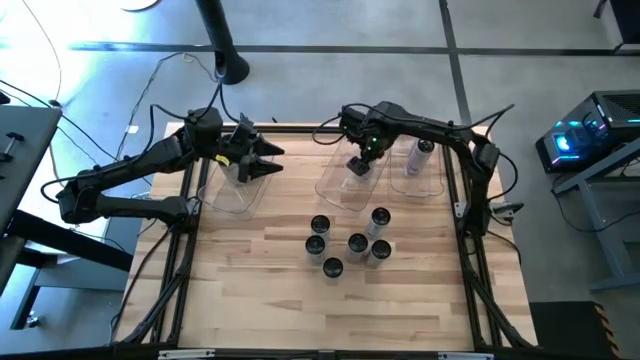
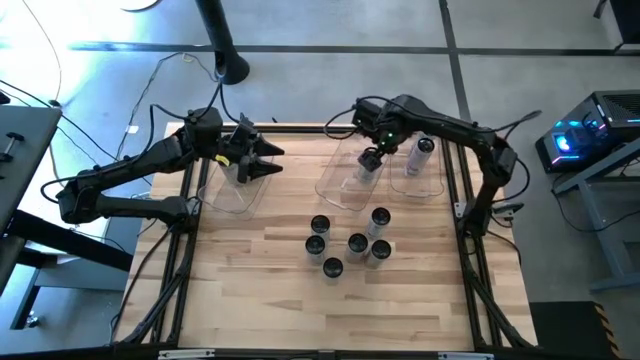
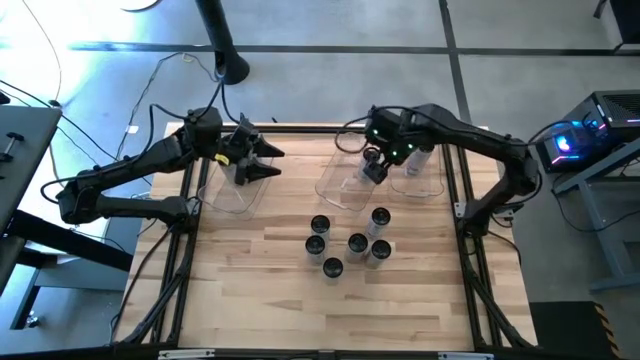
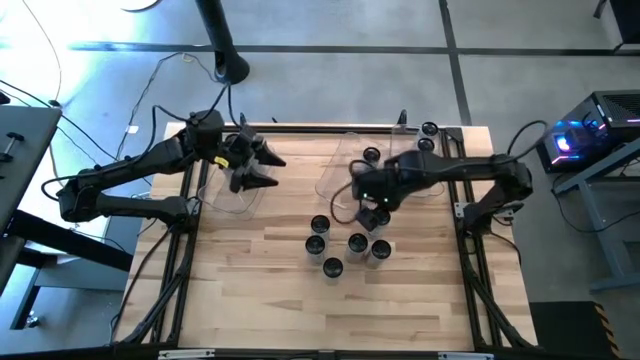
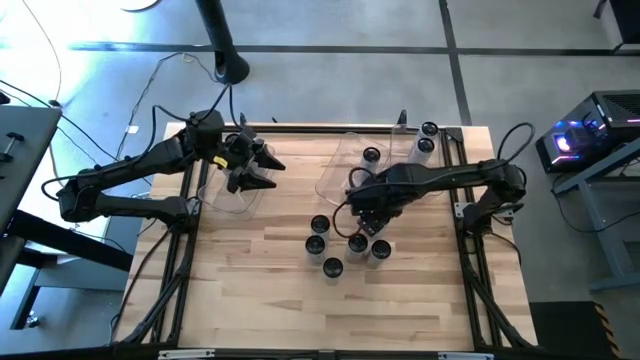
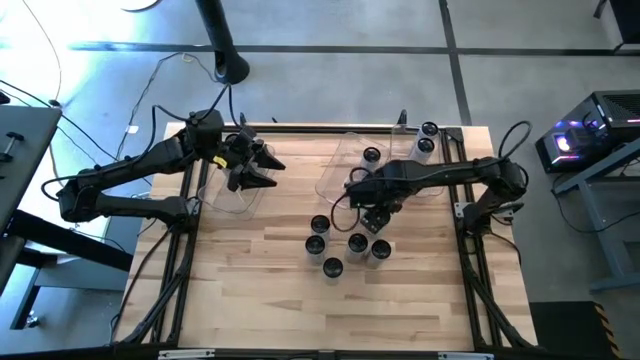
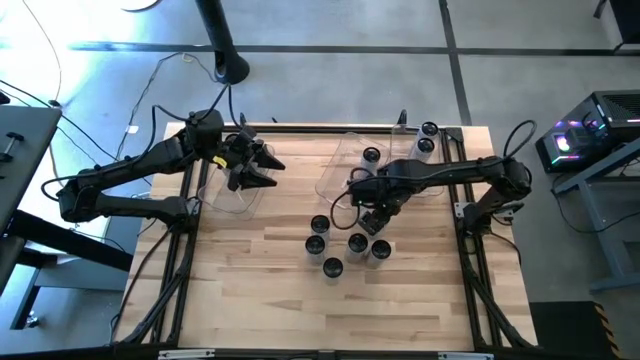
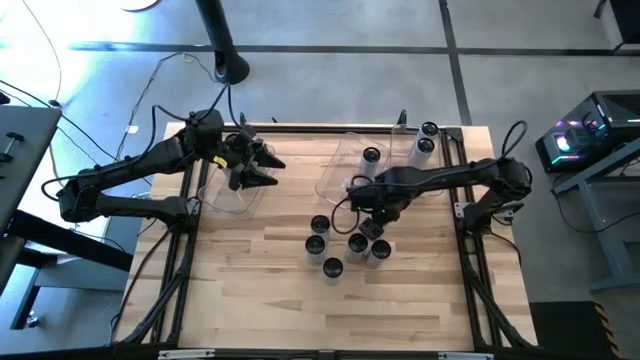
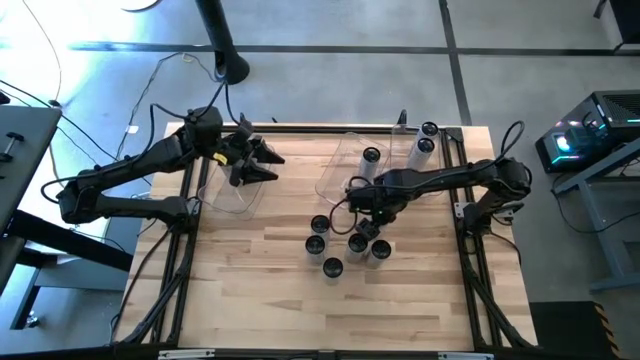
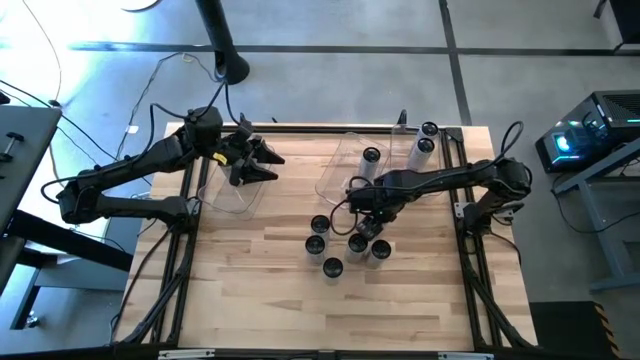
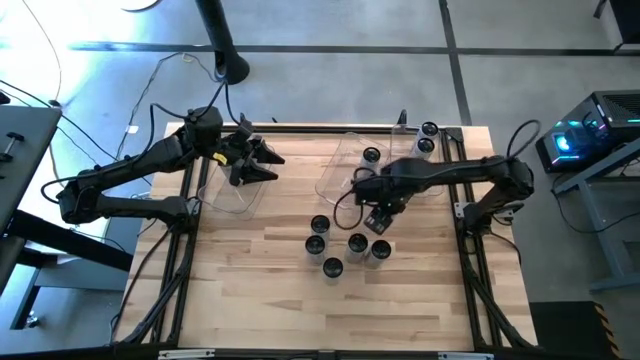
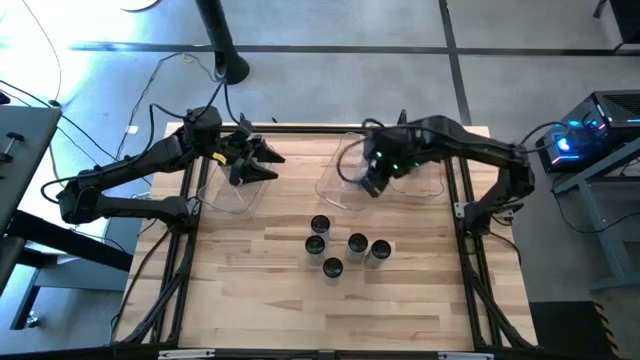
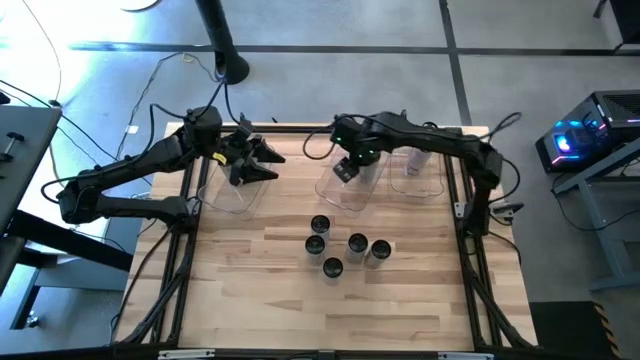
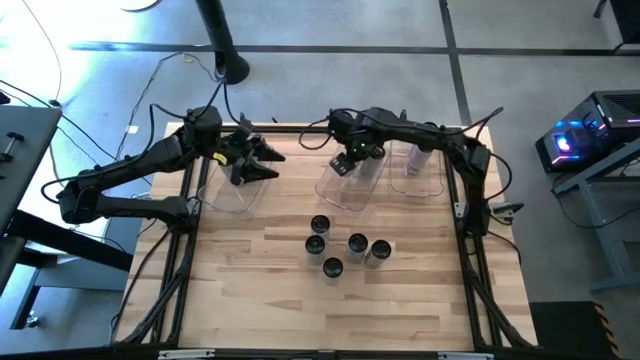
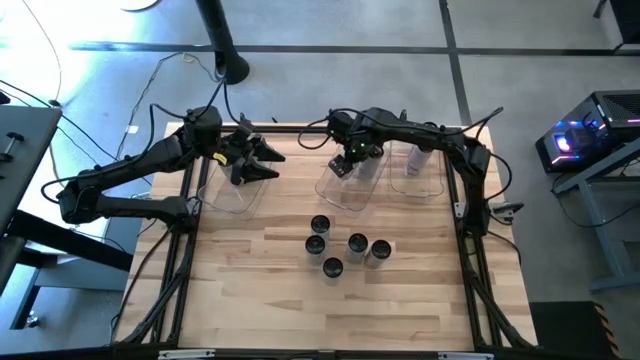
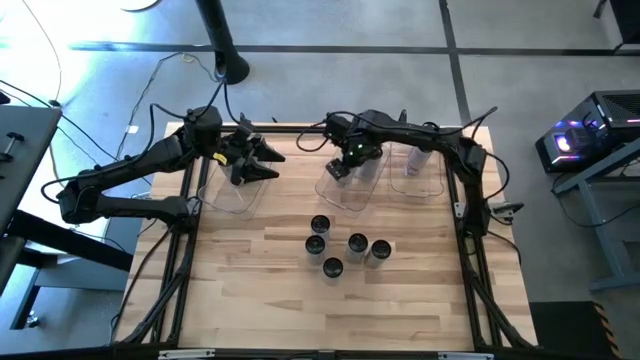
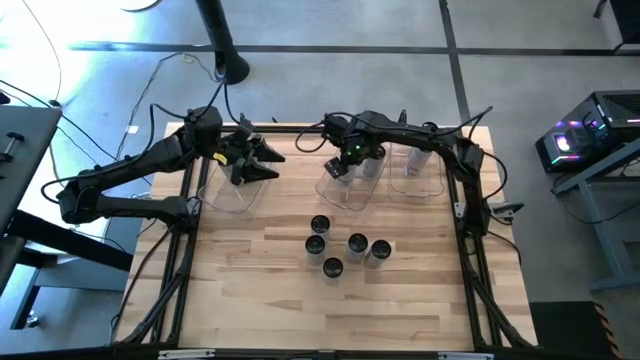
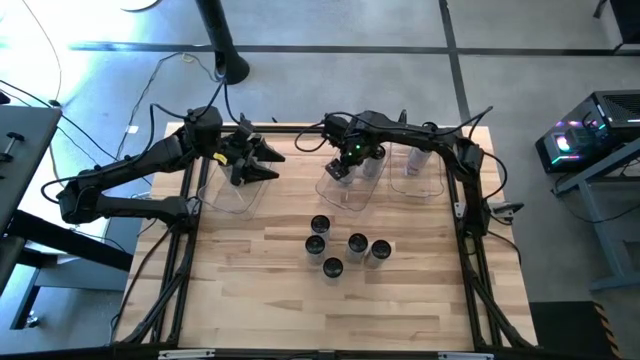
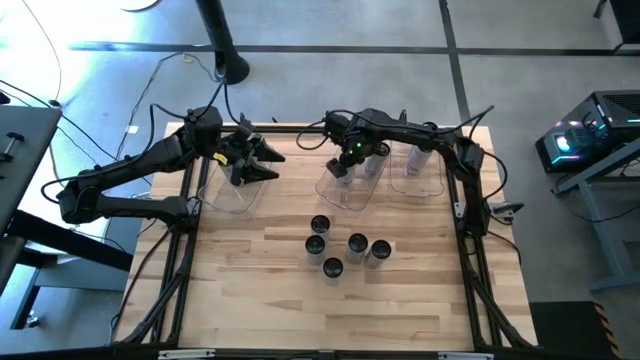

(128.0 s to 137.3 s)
Task: Sort soda cans
Put the white-blue soda can into the top center transparent bin

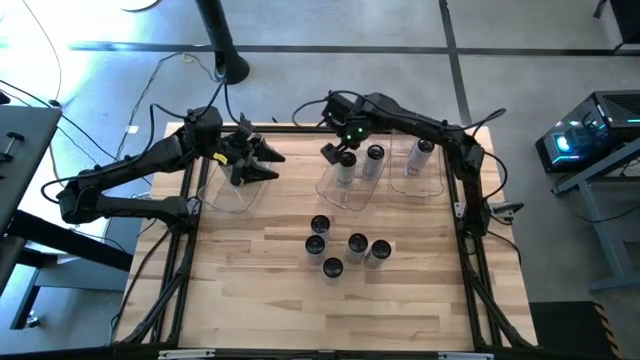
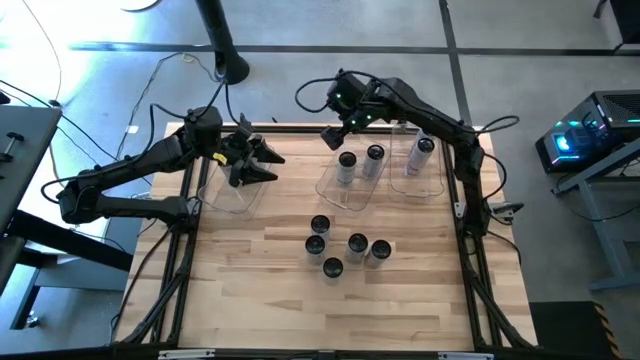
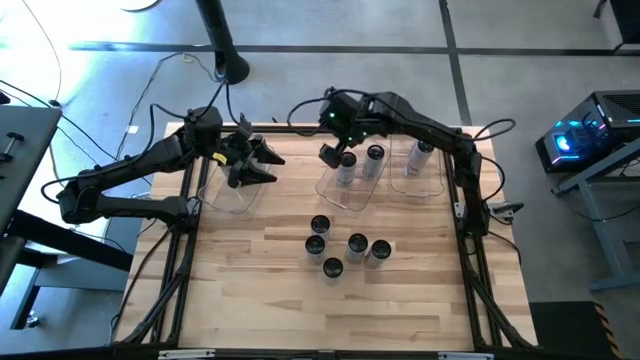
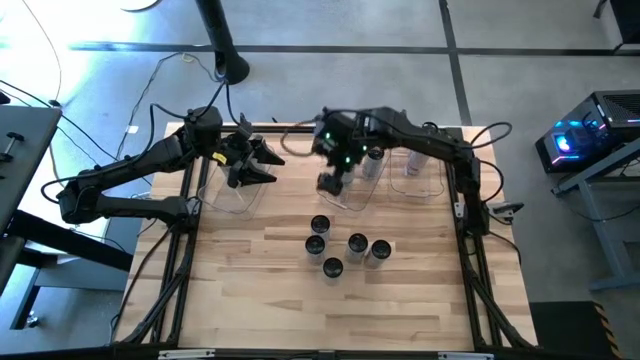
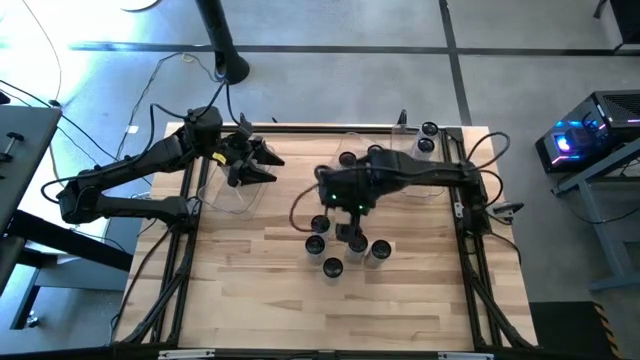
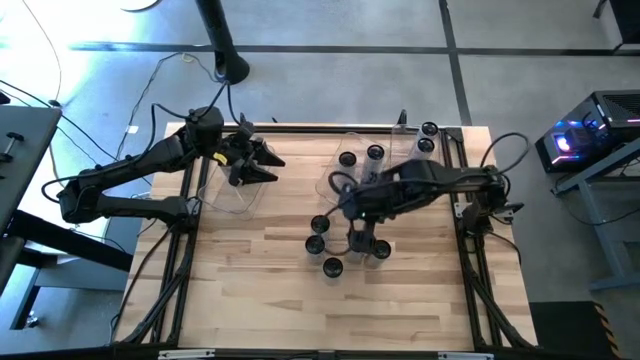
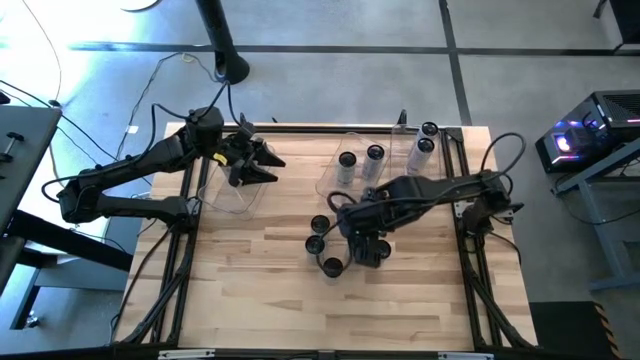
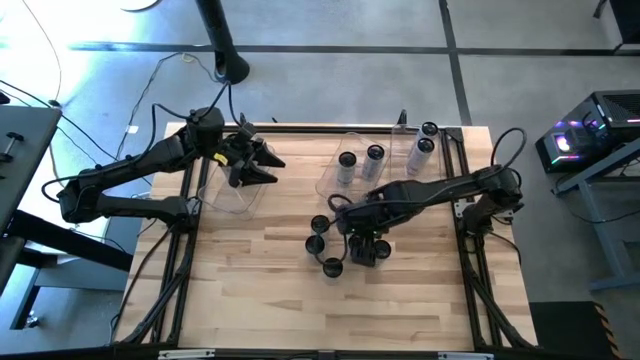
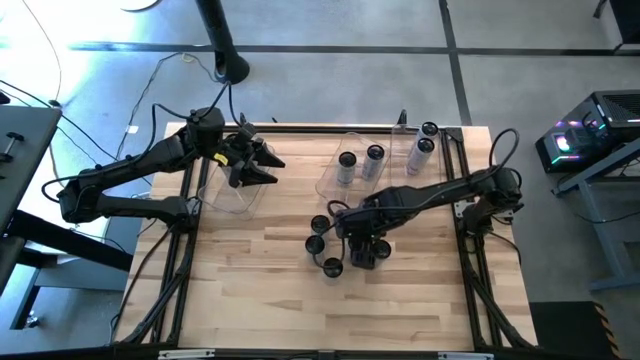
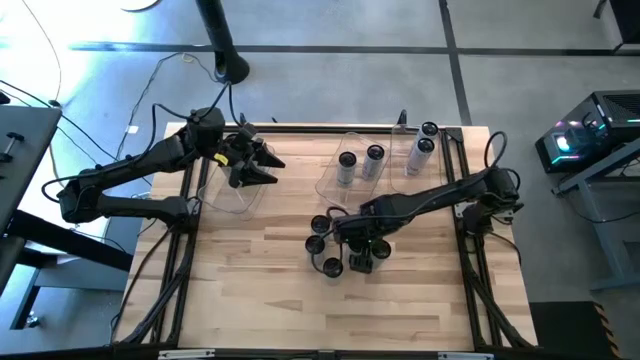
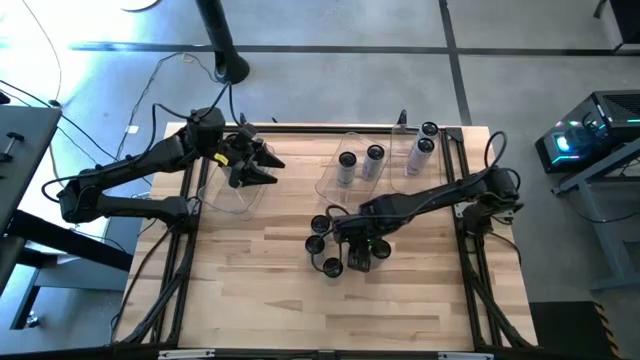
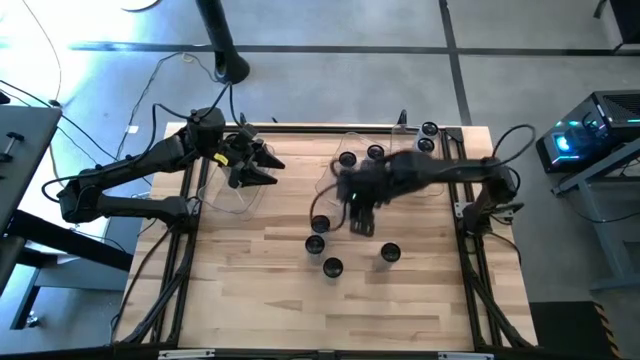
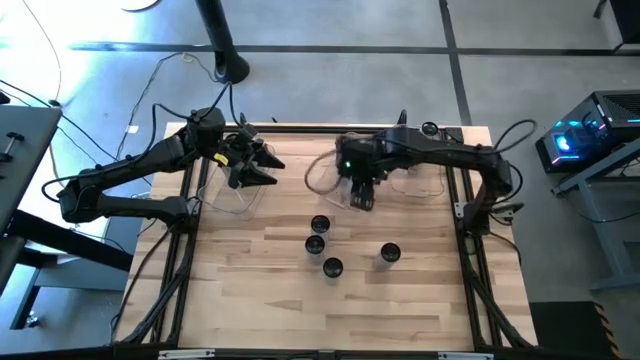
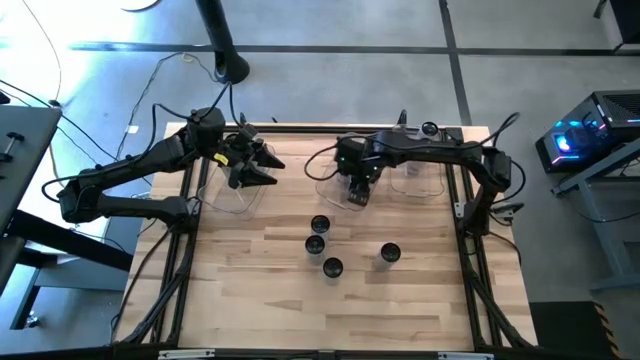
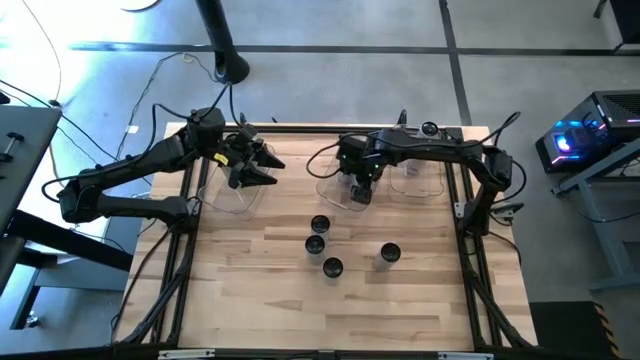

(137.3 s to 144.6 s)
Put the white-blue soda can into the top center transparent bin

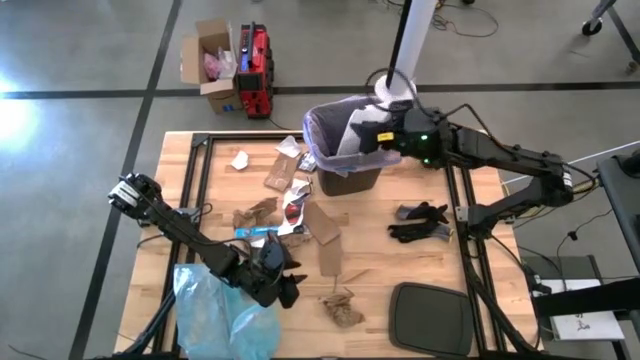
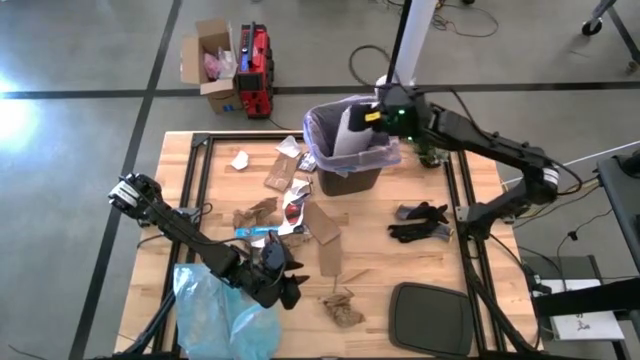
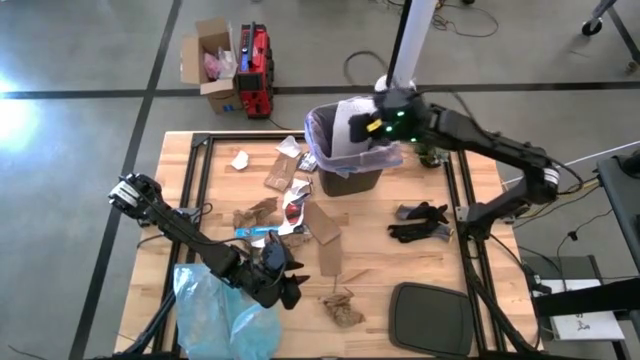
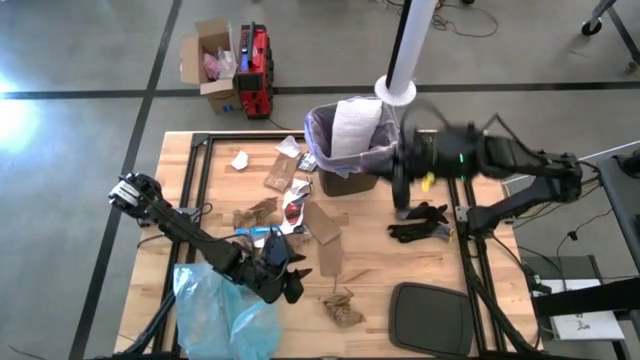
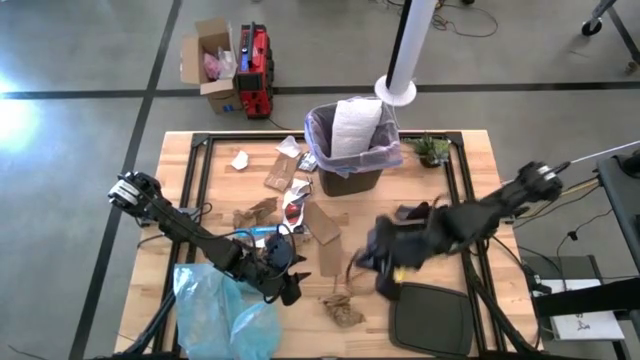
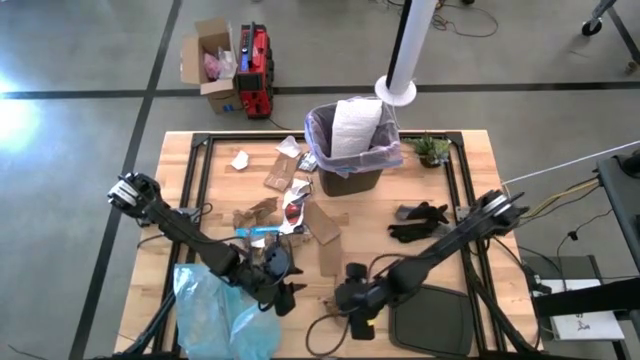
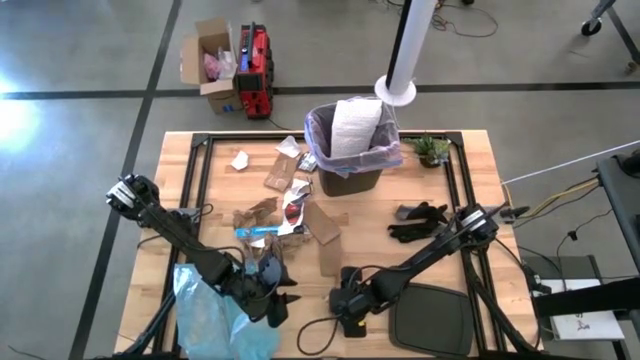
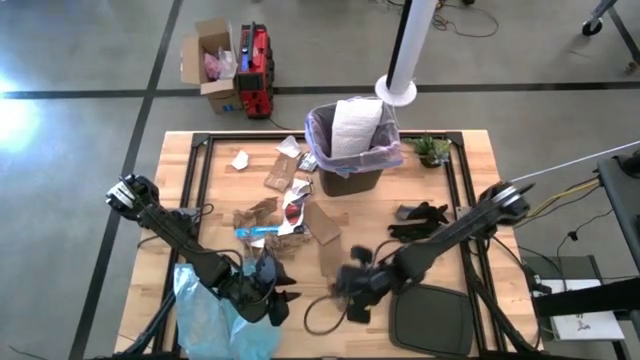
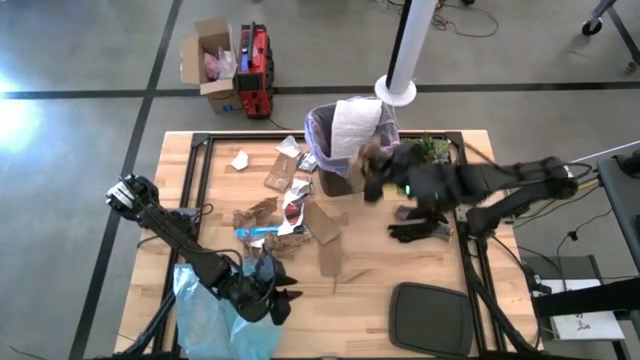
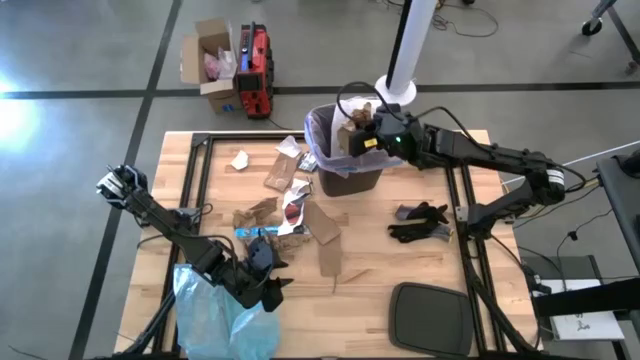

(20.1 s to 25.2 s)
Task: place trash/remove bag and relplace
Put the brown paper napkin into the trash bin
